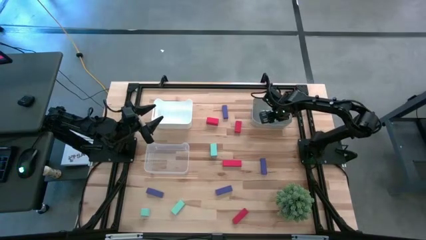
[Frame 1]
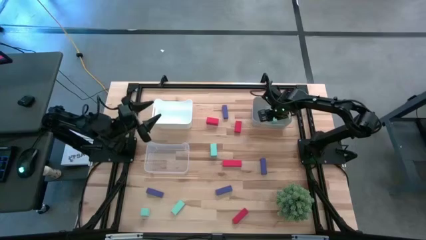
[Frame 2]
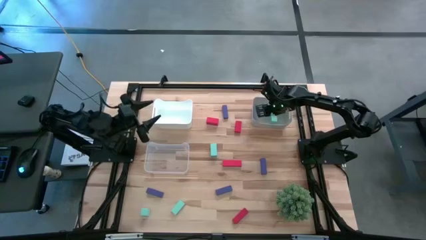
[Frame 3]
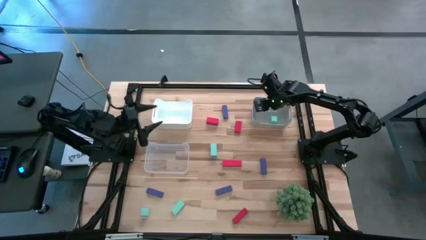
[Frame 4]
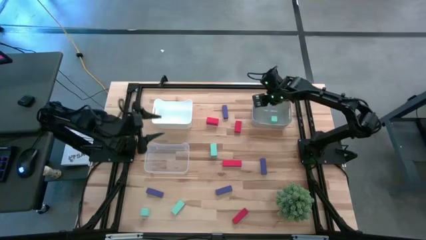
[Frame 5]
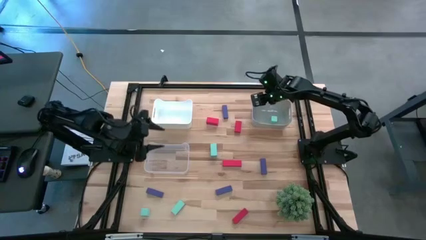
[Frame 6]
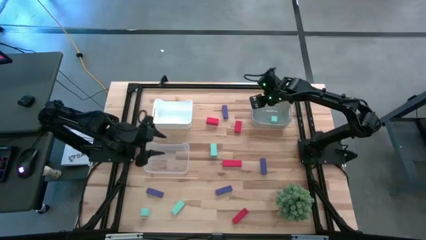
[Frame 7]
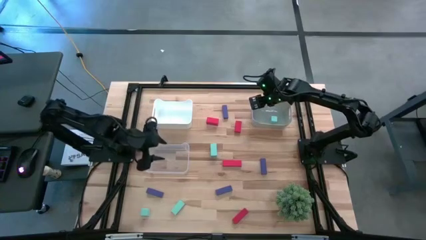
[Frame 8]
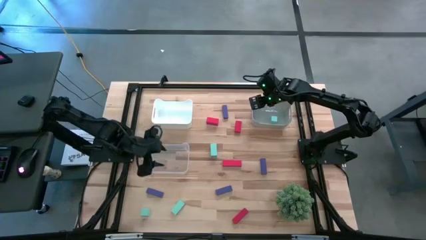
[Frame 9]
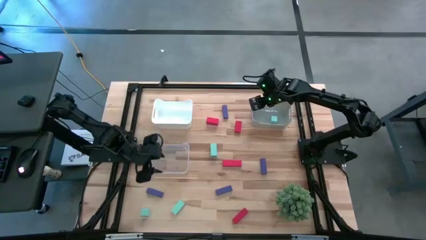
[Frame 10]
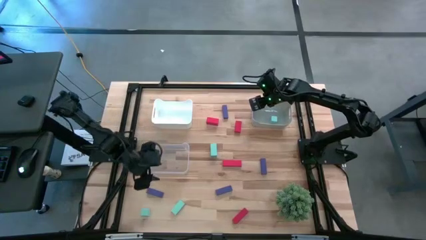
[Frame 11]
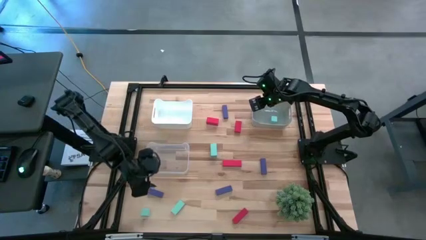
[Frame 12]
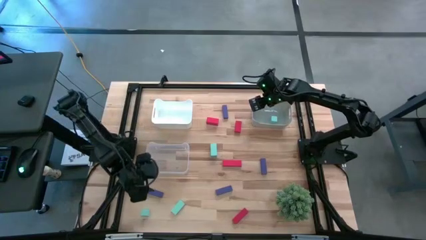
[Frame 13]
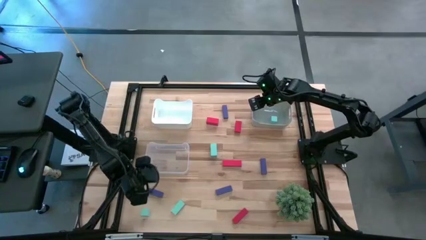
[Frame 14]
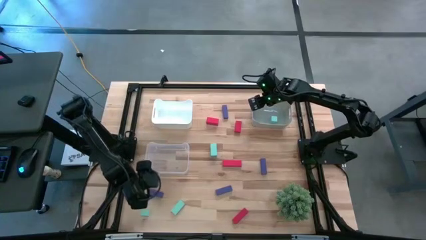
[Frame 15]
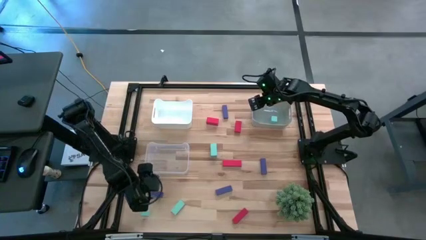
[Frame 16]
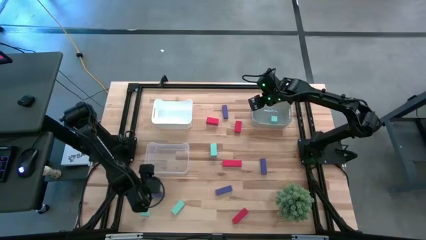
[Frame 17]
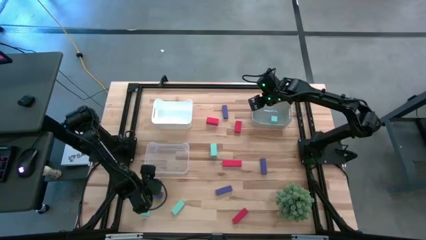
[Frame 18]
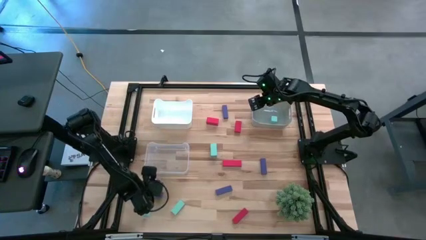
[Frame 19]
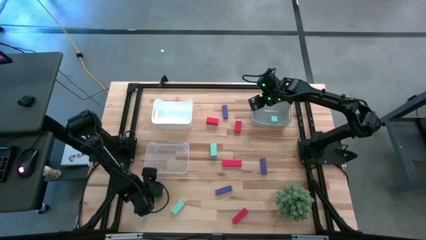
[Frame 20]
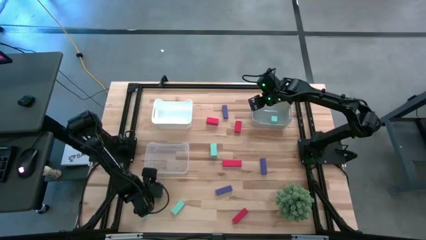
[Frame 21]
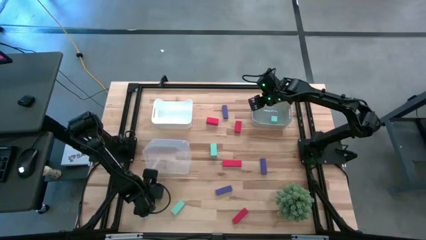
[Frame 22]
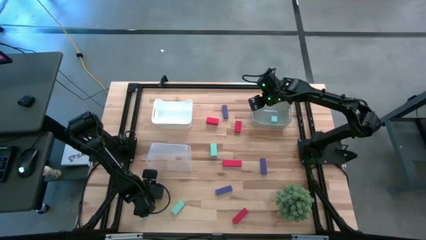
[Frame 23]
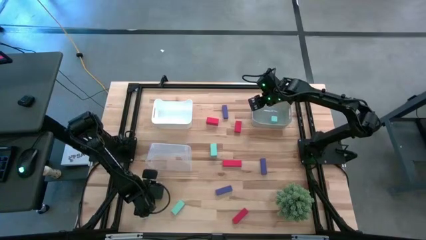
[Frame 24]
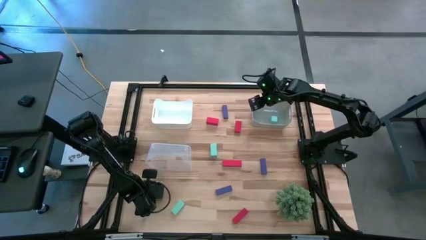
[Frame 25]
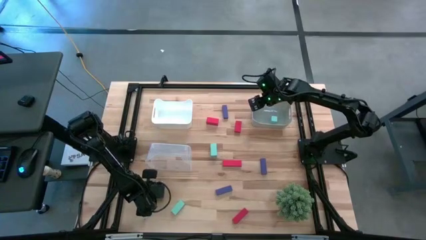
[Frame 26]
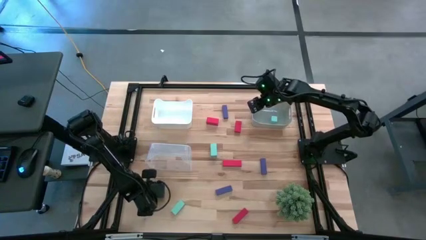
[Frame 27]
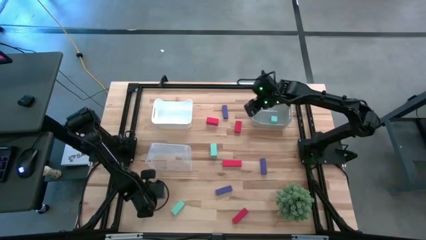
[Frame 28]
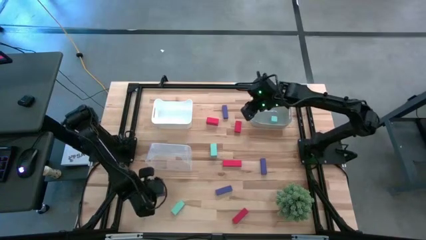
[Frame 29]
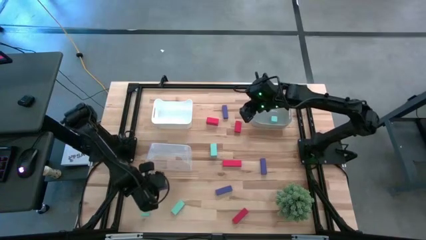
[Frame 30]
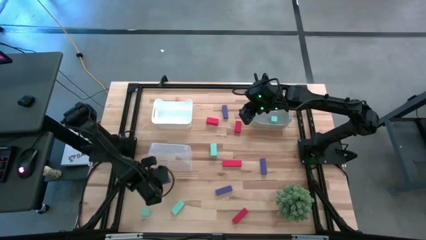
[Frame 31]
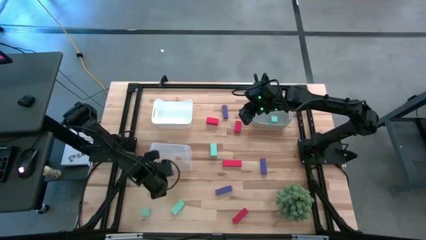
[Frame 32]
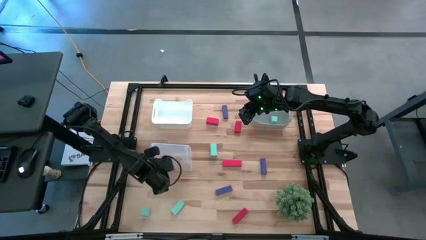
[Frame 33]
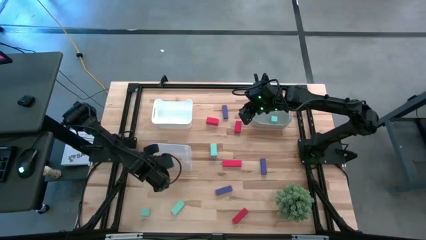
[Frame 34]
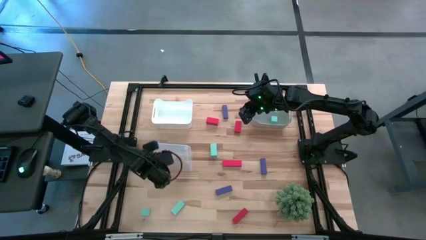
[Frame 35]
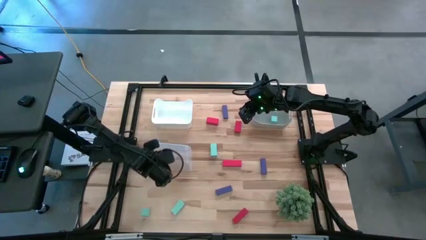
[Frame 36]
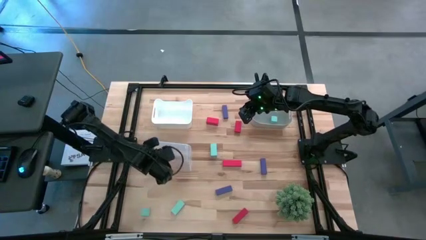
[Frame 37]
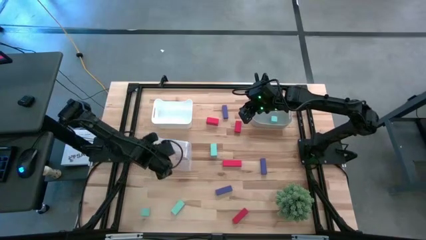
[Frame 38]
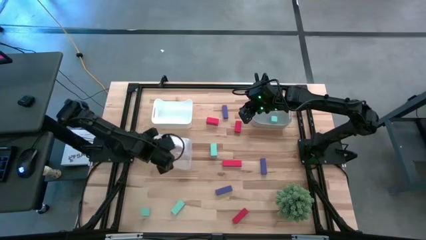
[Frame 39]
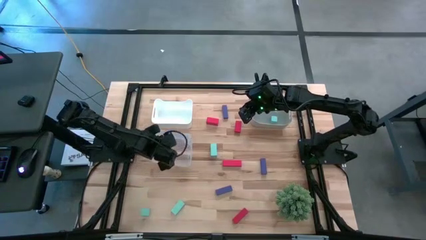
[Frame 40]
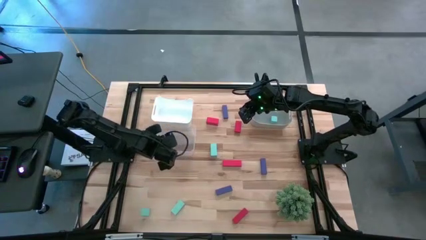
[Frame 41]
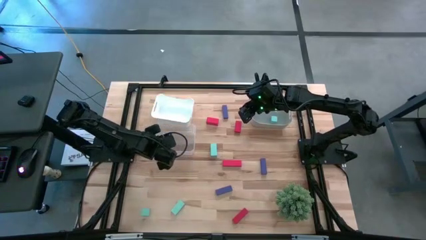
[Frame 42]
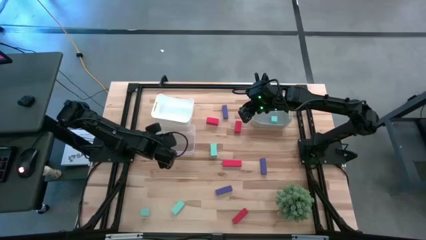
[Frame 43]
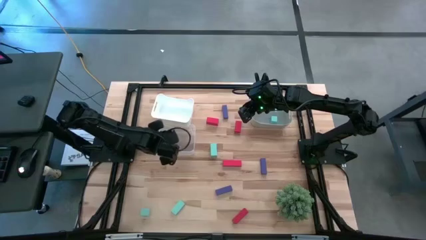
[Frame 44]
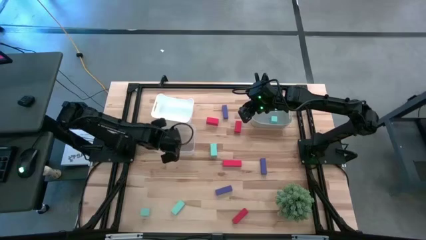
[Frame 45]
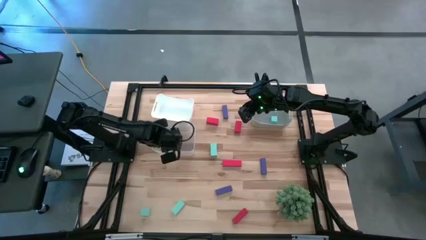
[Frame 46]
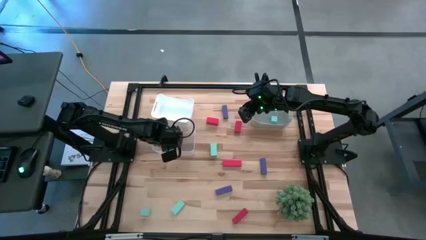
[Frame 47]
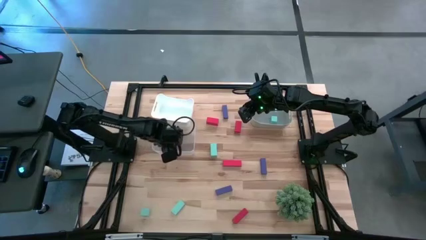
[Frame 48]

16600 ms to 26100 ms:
Task: Sort & place blocks by color
Put the purple block into the transparent bin

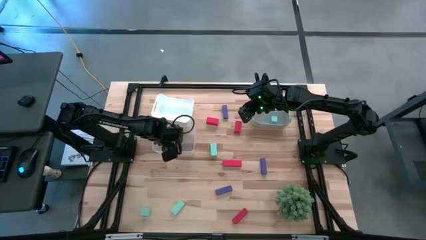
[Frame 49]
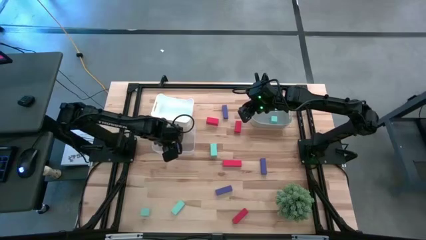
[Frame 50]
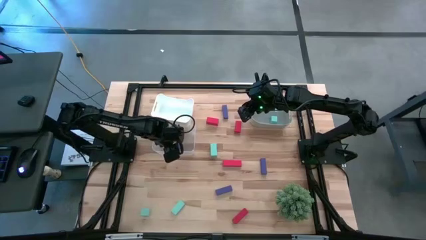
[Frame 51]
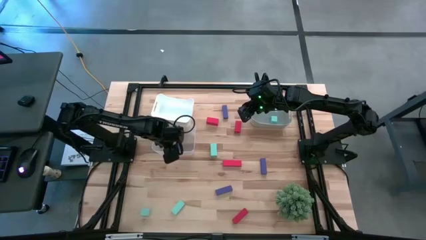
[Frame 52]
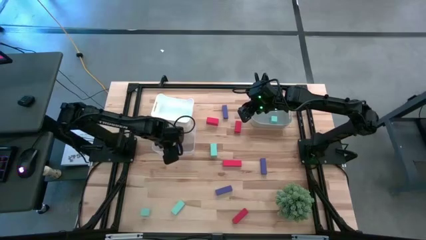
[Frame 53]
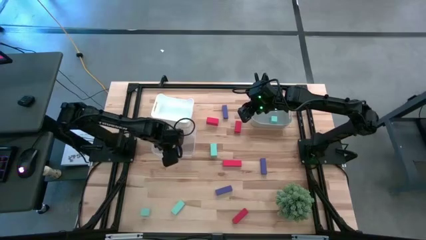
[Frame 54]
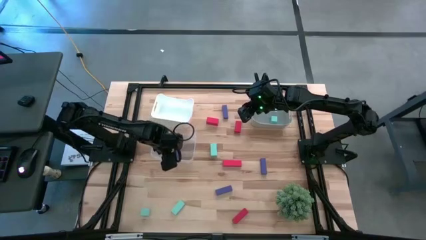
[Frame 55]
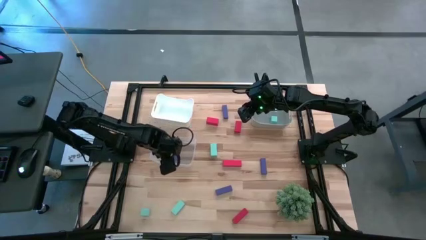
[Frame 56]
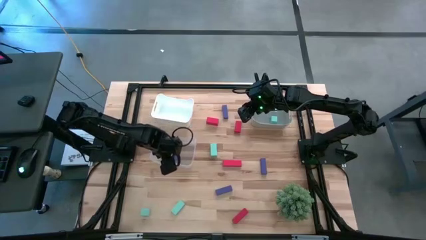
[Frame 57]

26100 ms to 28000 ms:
Adjust the transparent bin
